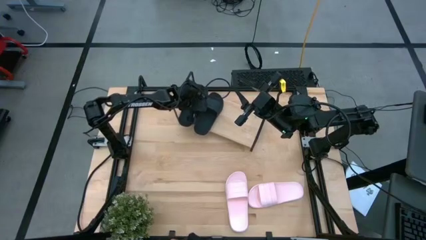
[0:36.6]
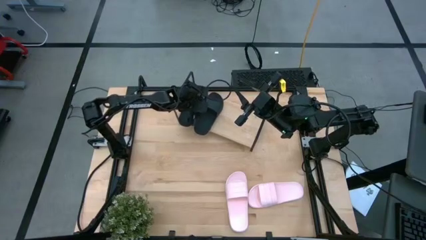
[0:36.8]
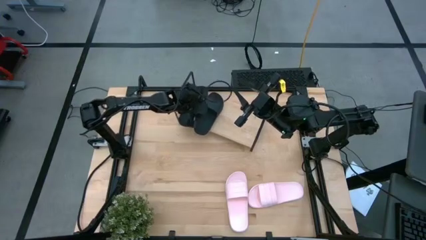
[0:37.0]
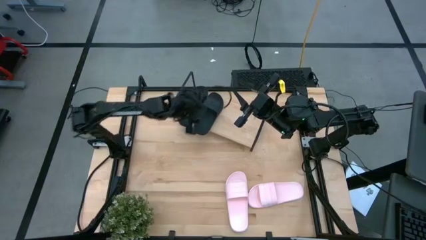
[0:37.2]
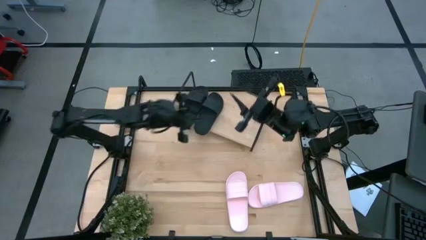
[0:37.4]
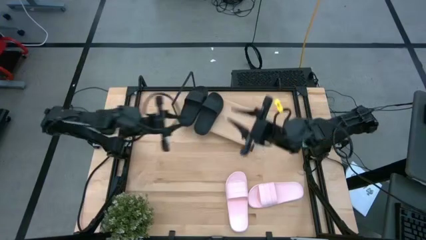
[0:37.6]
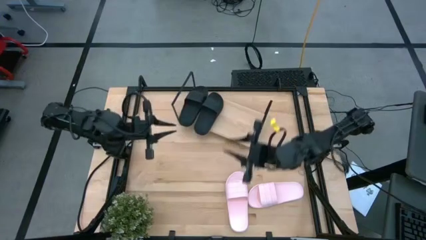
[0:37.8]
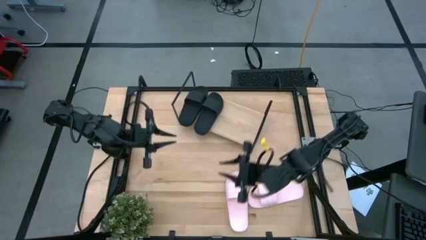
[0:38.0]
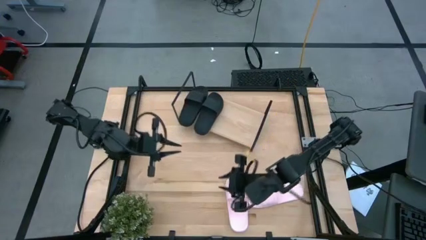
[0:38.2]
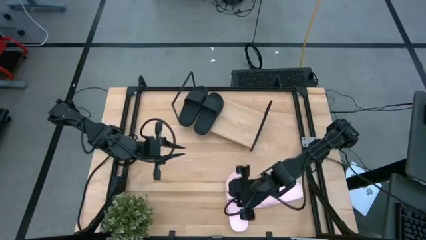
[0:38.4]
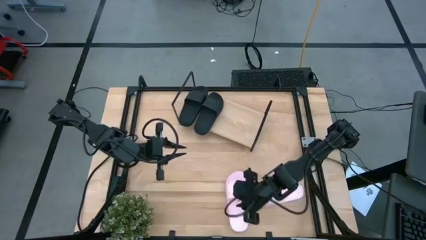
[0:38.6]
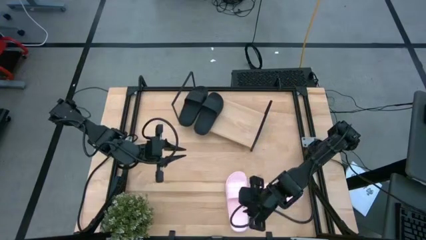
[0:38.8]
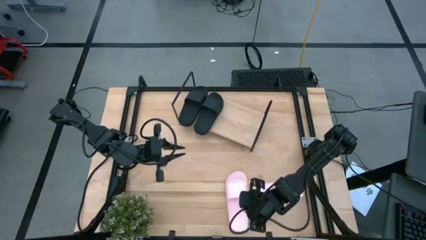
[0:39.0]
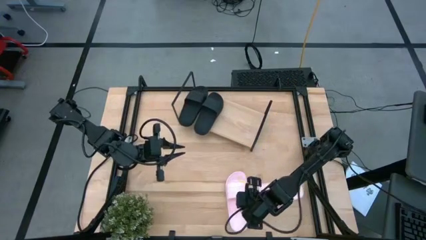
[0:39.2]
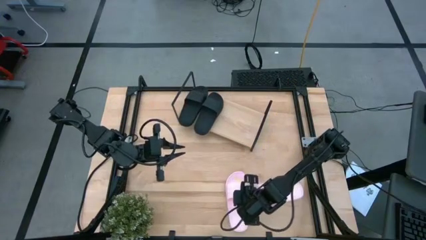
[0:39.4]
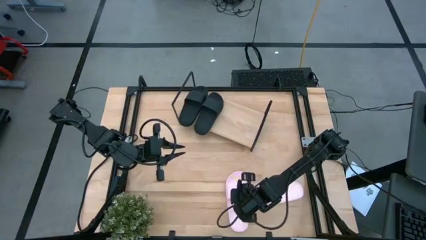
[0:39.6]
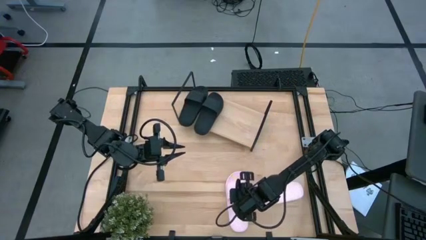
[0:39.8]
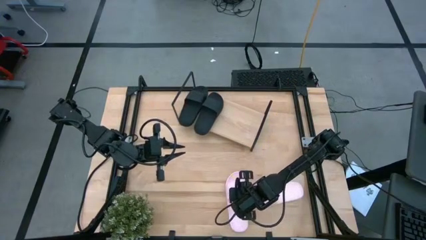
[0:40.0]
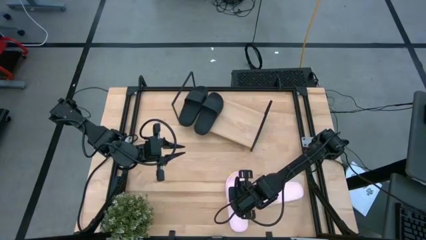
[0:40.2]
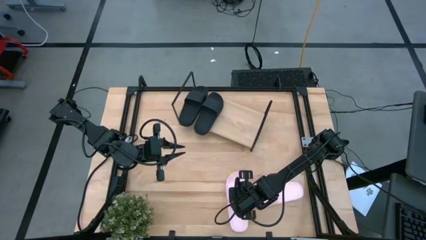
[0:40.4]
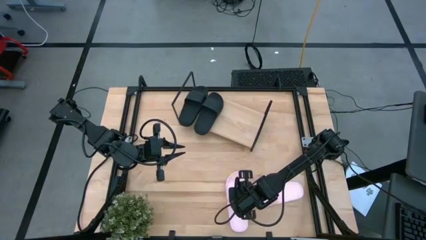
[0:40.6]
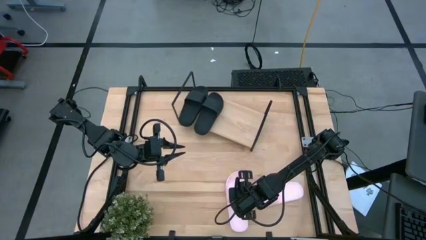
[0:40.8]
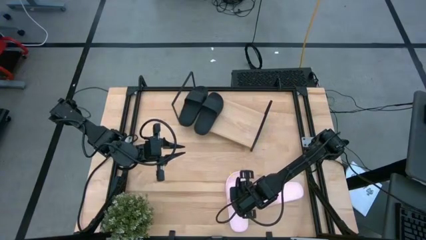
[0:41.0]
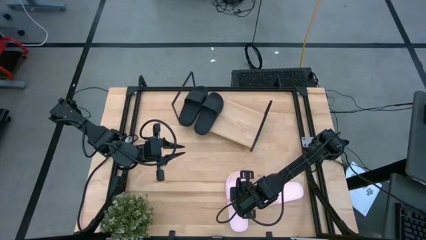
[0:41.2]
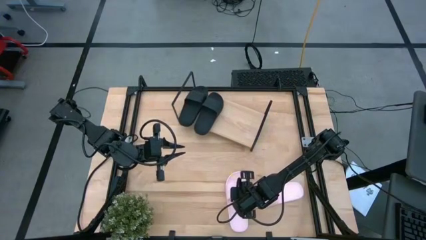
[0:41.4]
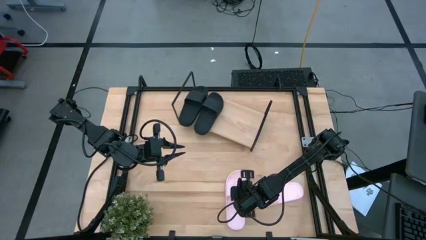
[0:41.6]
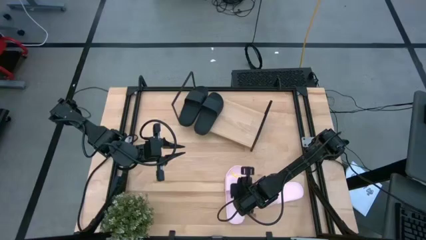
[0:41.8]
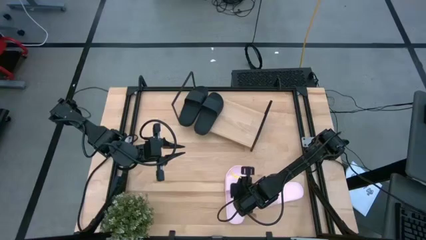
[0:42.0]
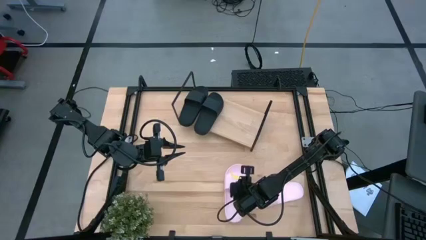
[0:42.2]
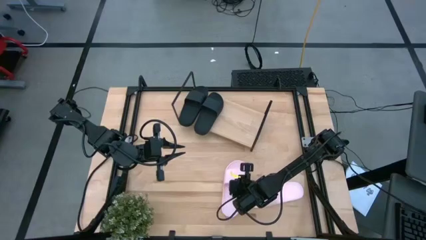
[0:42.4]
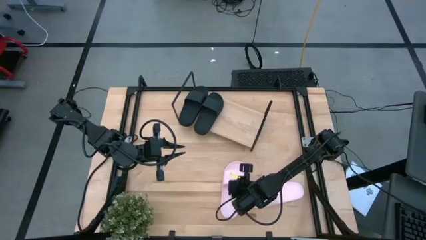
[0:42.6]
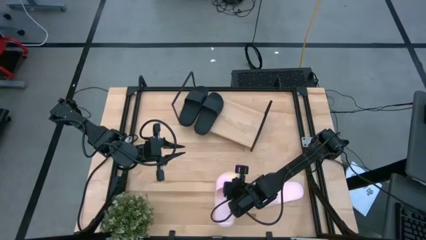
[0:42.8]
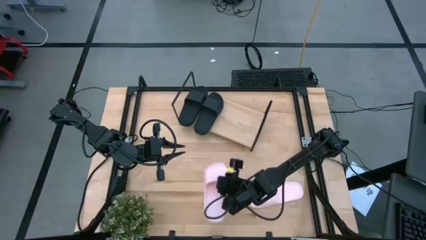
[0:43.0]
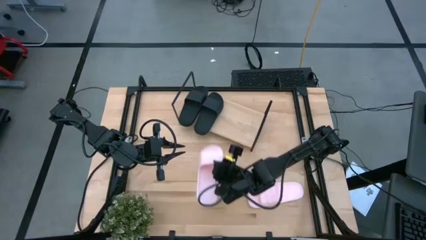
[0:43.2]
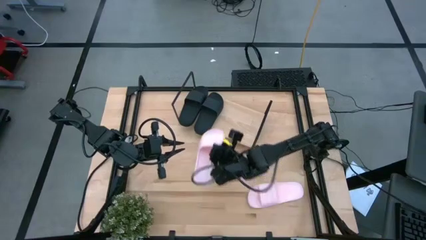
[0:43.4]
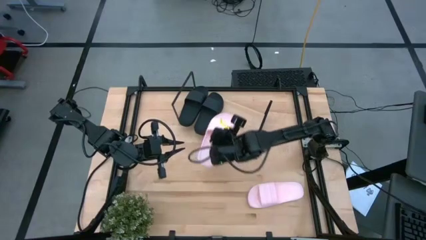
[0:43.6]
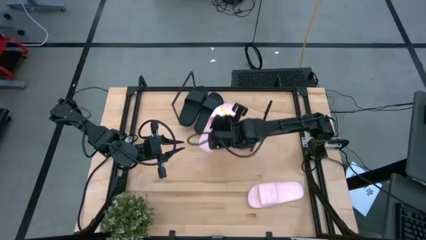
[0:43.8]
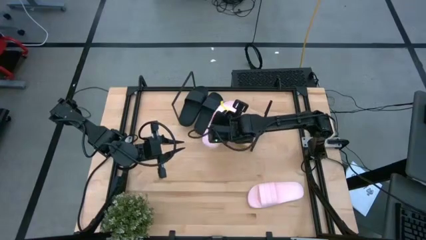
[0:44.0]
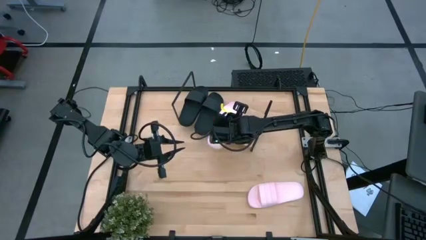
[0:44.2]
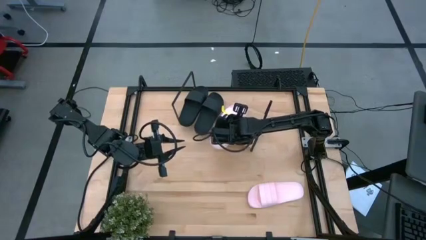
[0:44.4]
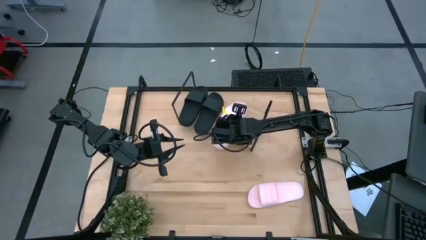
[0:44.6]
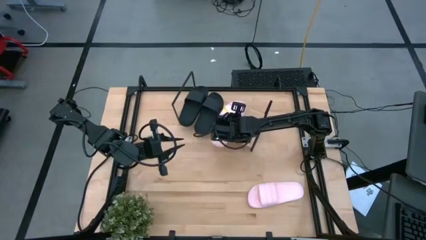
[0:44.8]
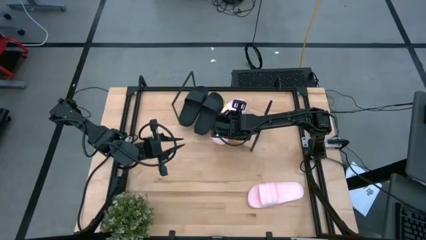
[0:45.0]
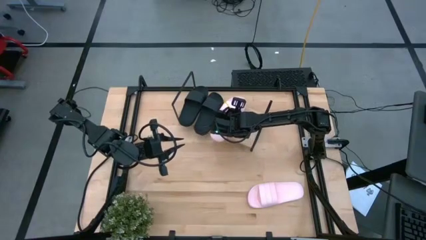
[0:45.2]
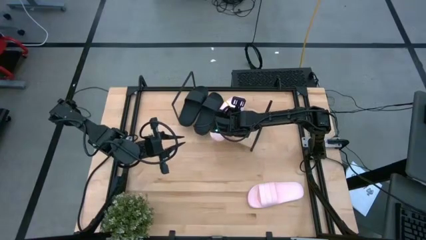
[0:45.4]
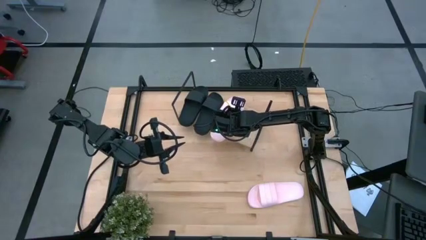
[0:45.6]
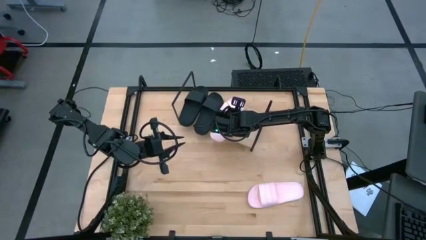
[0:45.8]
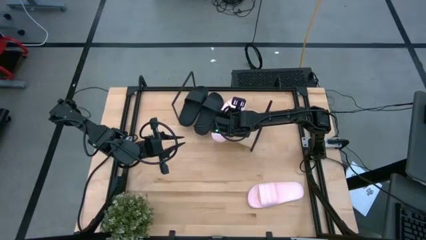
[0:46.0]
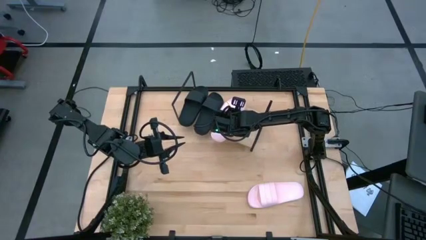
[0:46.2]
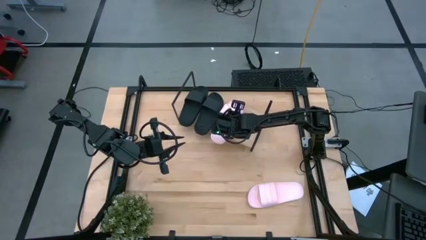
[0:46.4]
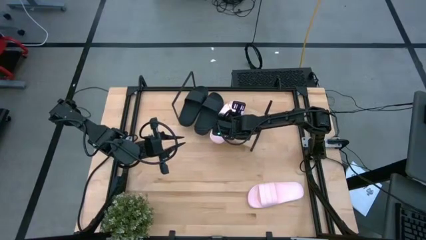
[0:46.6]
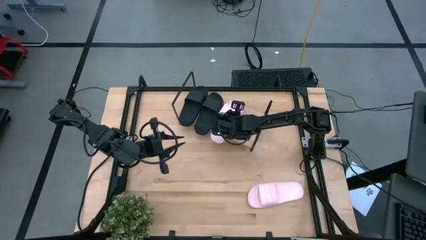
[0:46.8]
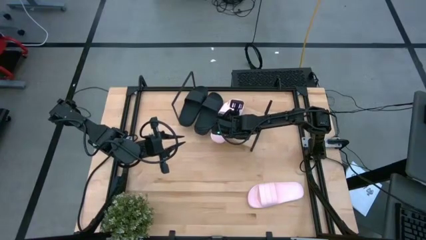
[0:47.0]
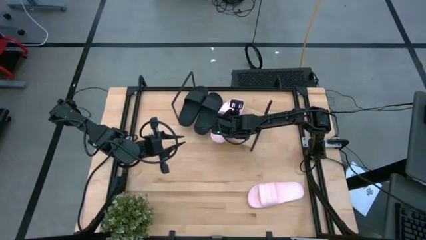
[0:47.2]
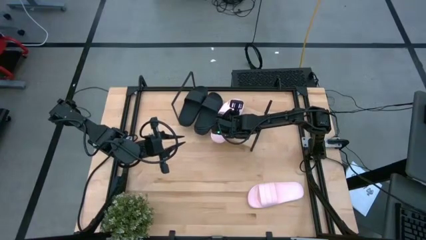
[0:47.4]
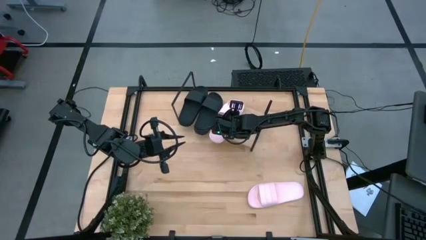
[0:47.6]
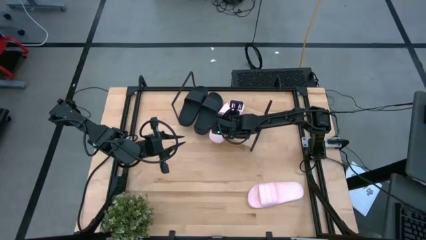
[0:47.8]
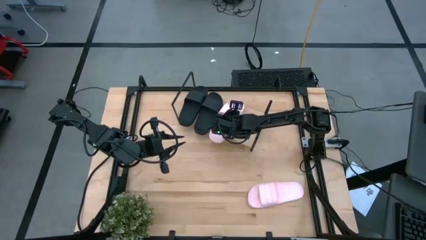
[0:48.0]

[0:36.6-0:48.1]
Task: Pick and place slides into the shelf
Put the left pink slides on the shelf
